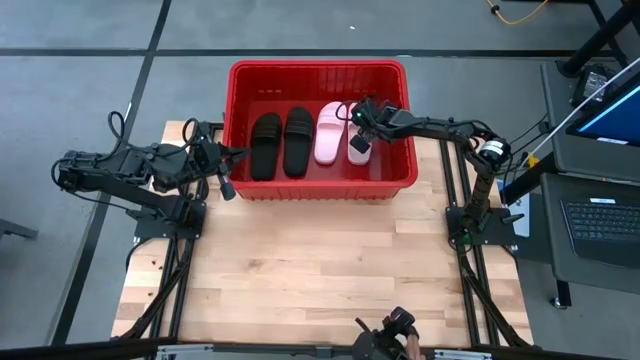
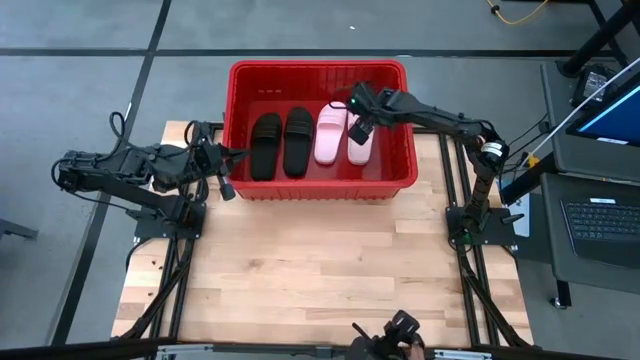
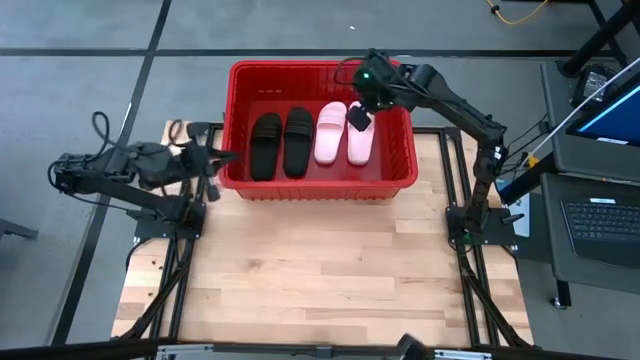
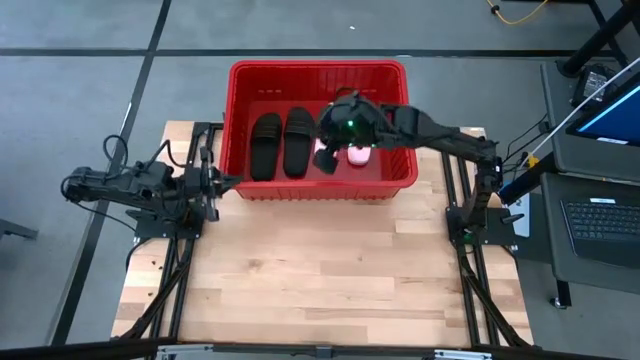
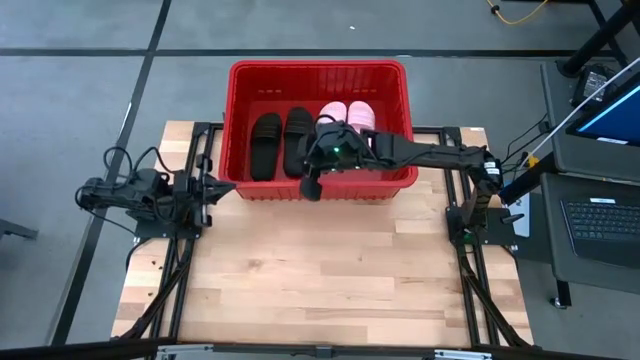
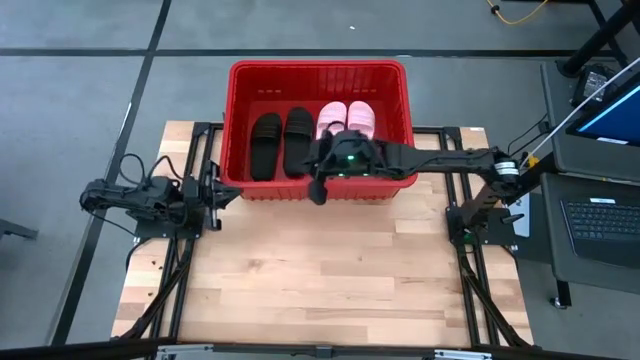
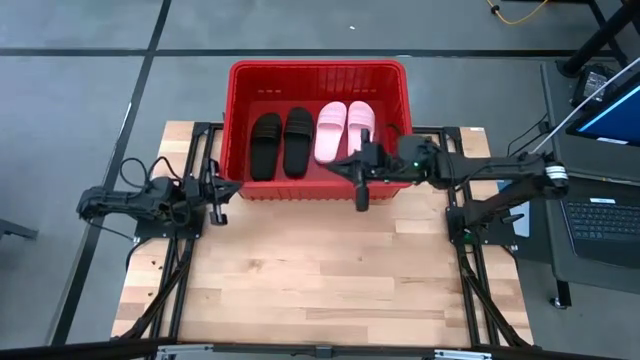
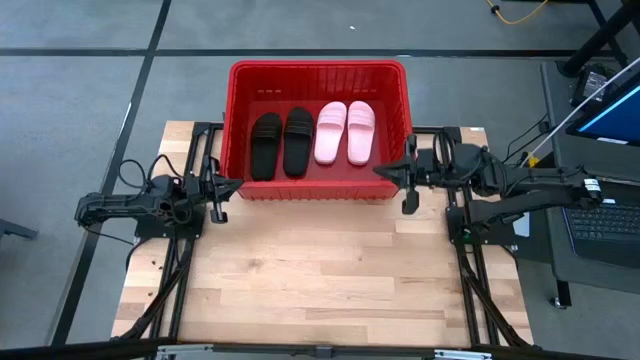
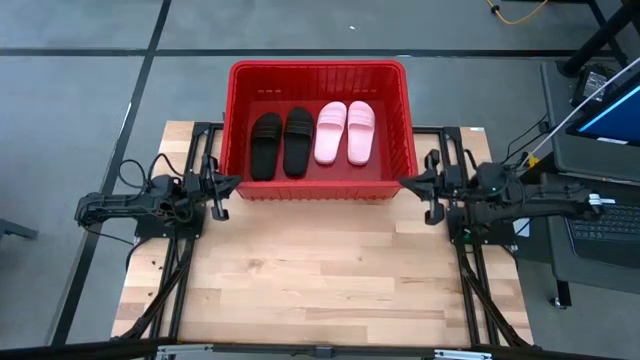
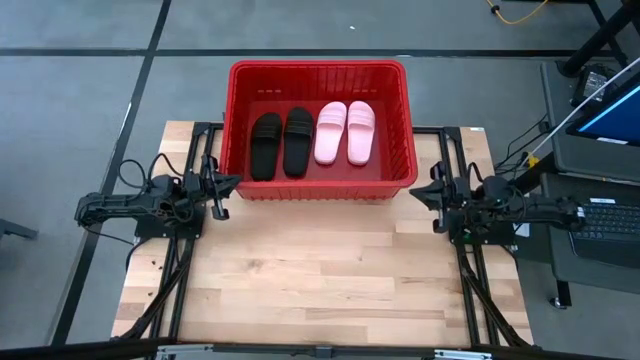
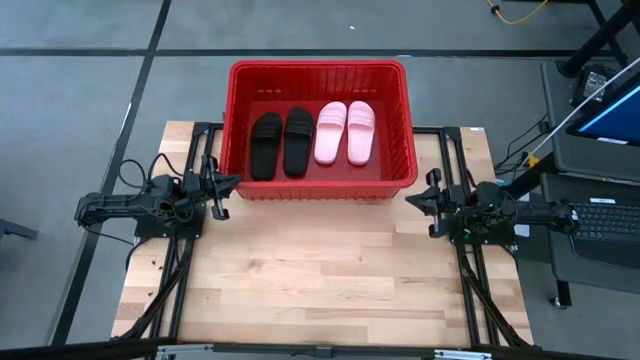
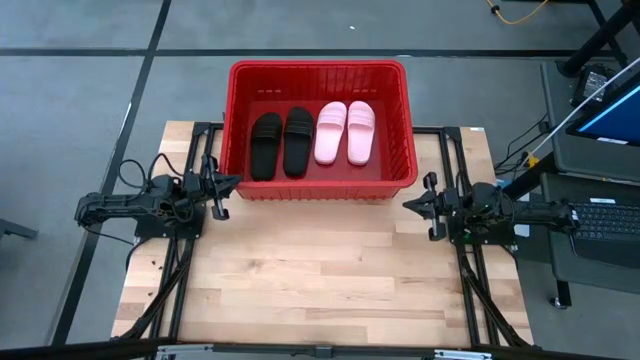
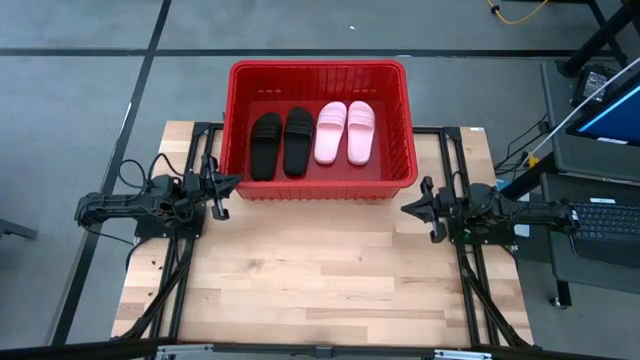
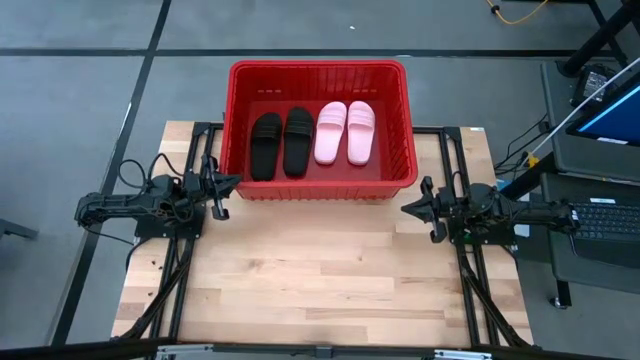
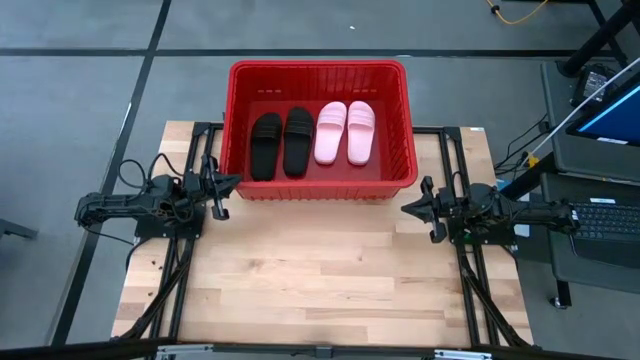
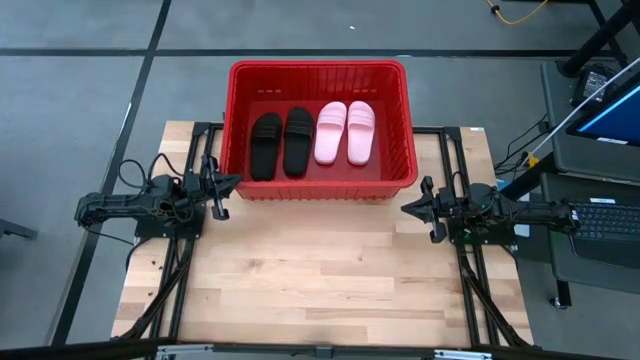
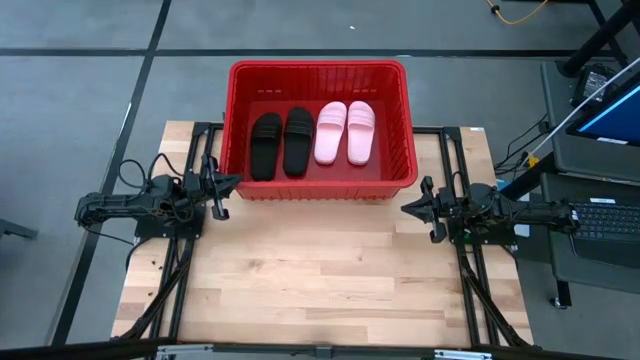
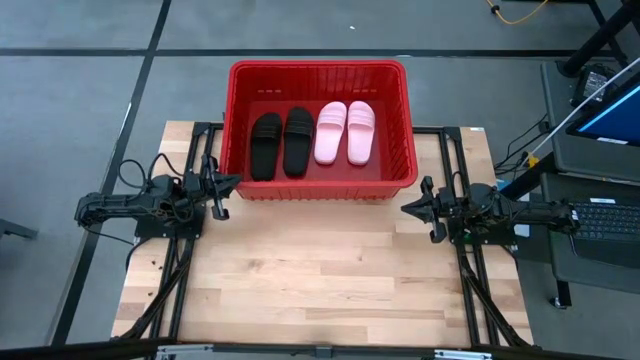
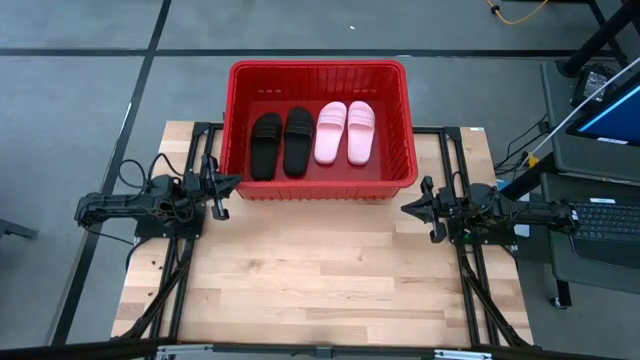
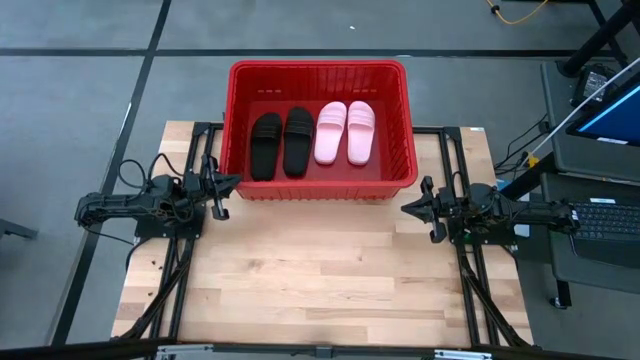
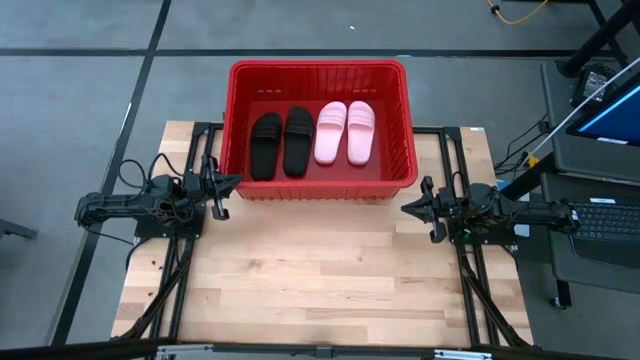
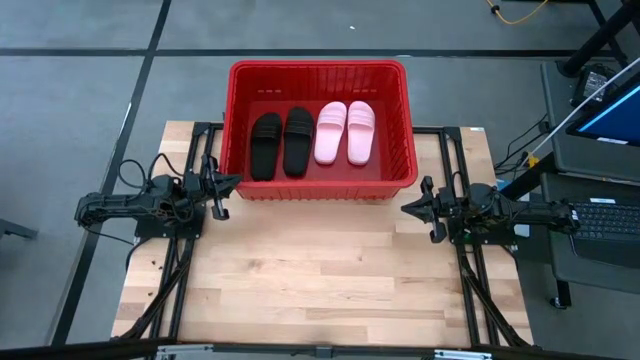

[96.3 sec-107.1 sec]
Task: Pick and place slides into bin
Return to Home Position

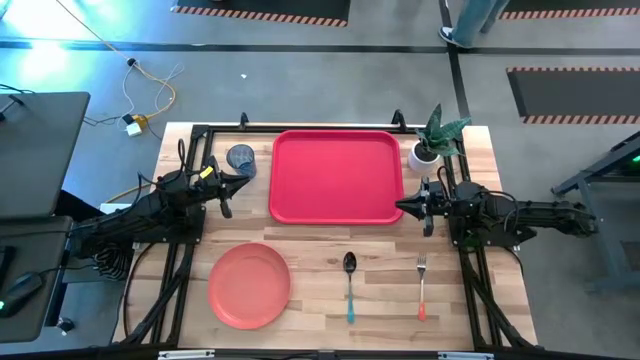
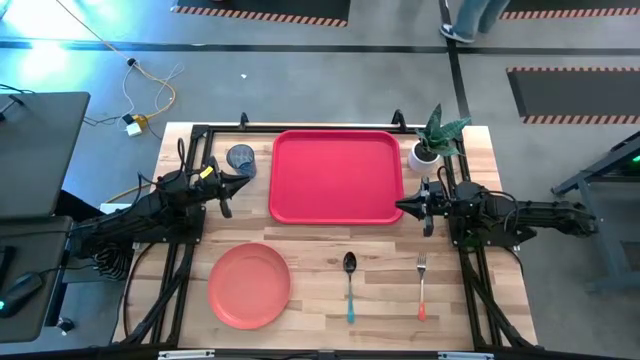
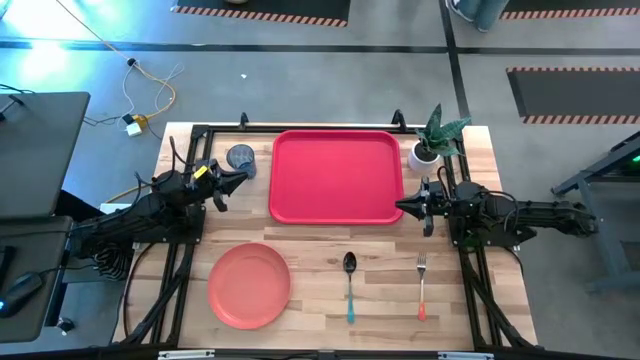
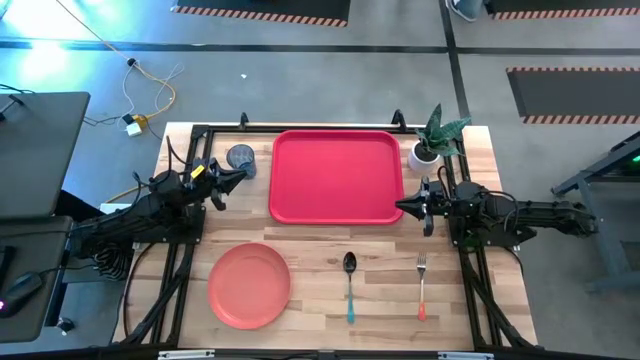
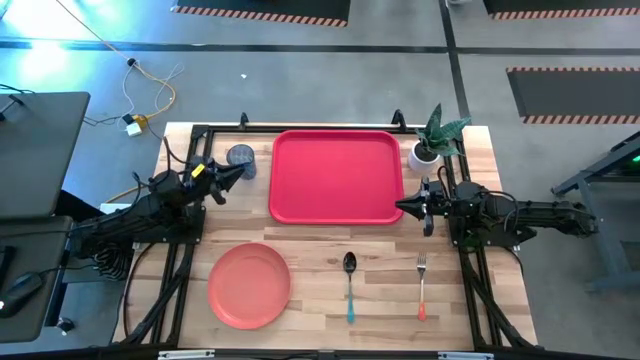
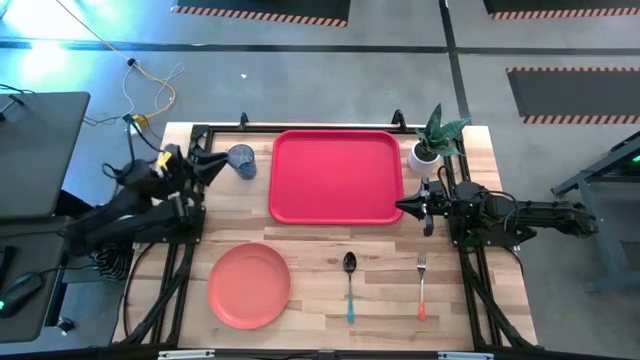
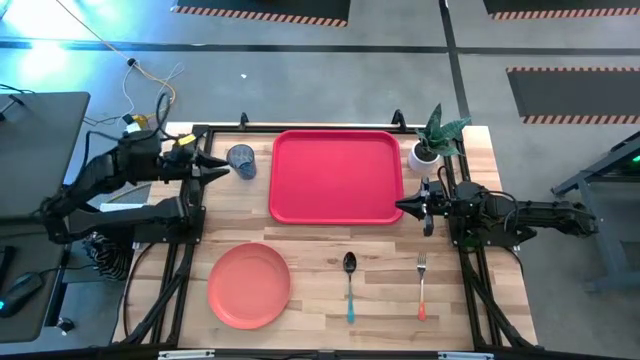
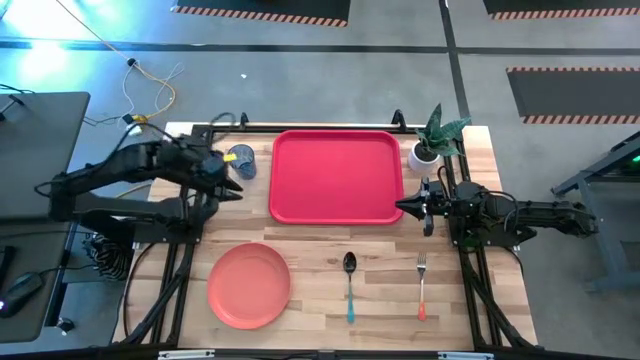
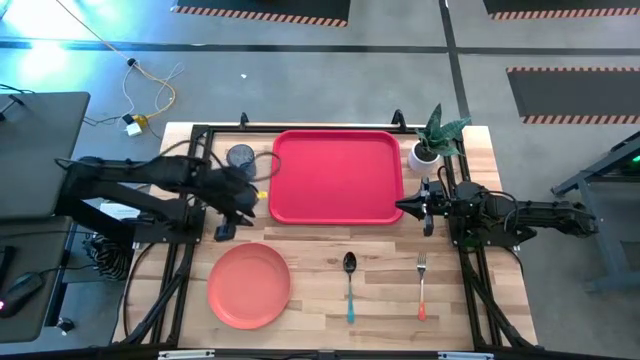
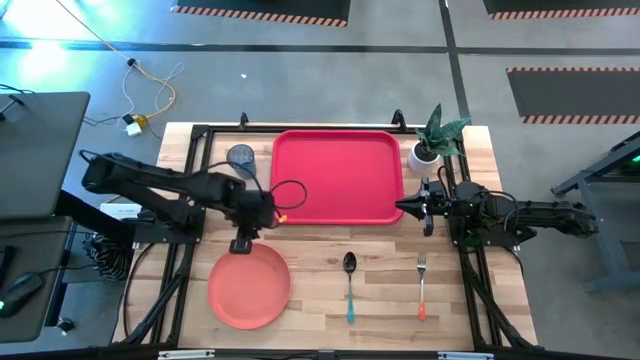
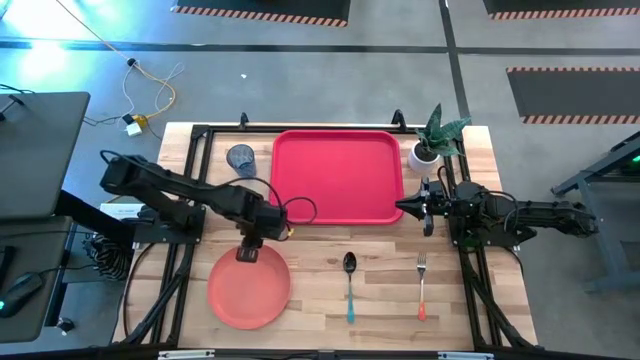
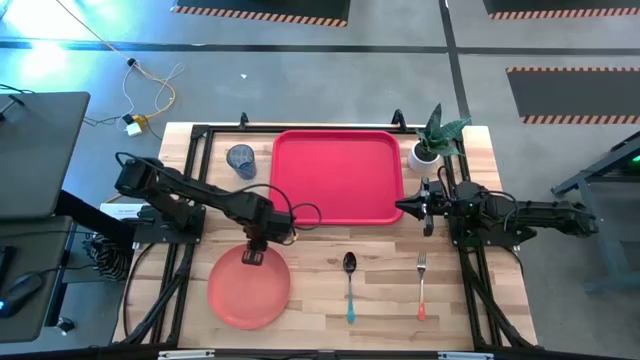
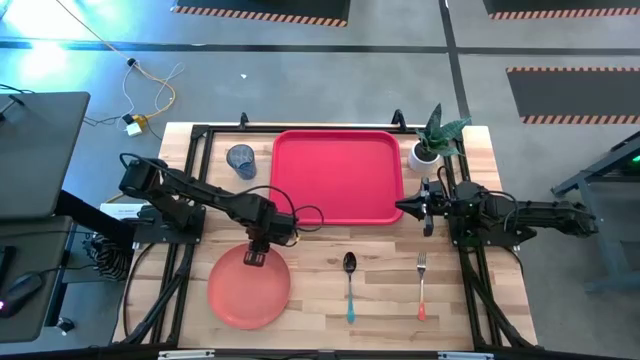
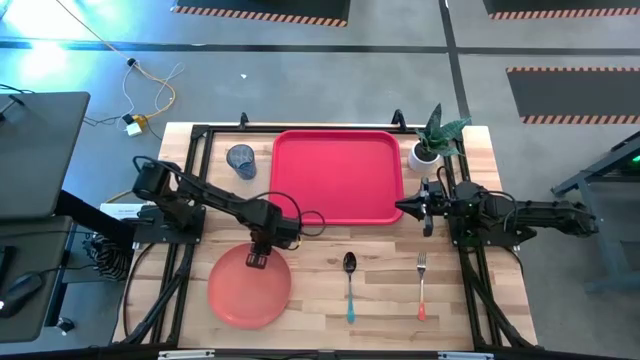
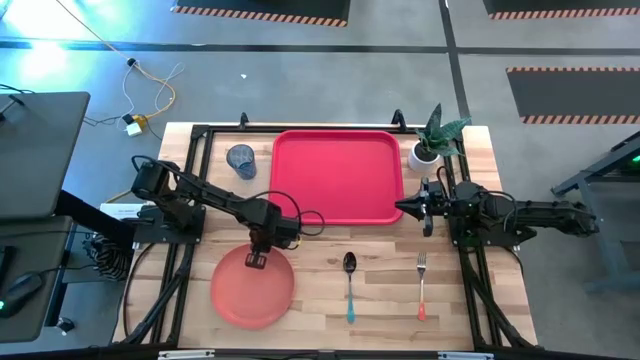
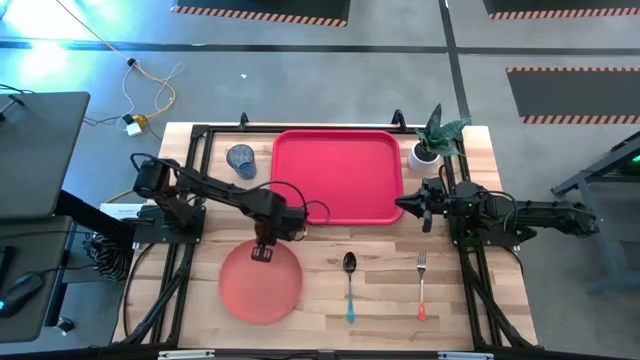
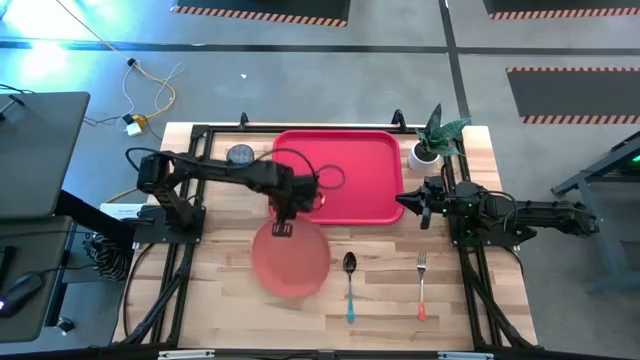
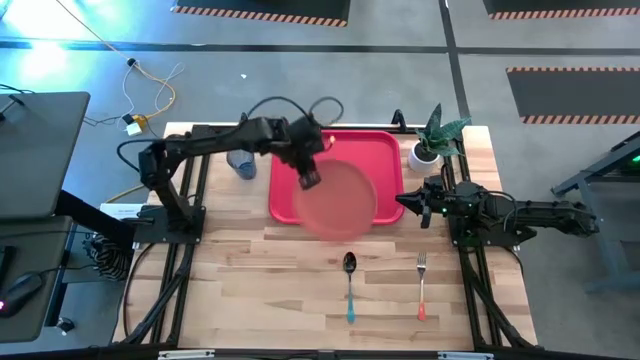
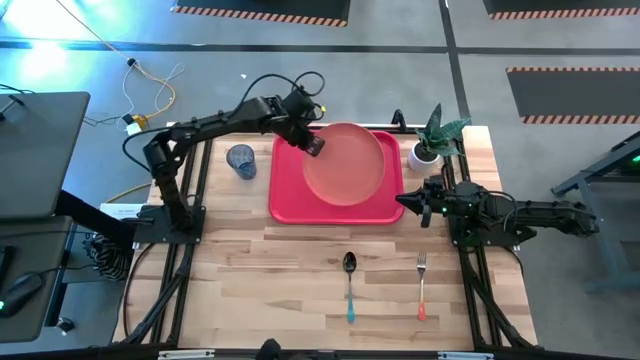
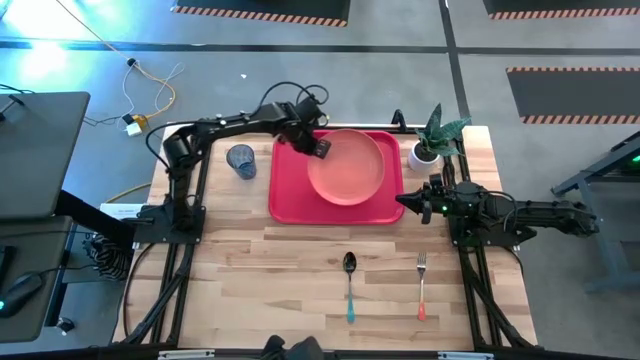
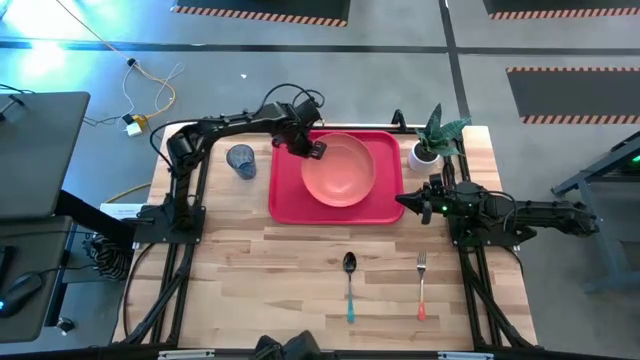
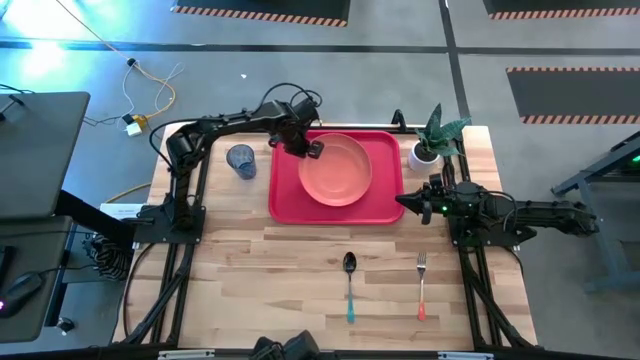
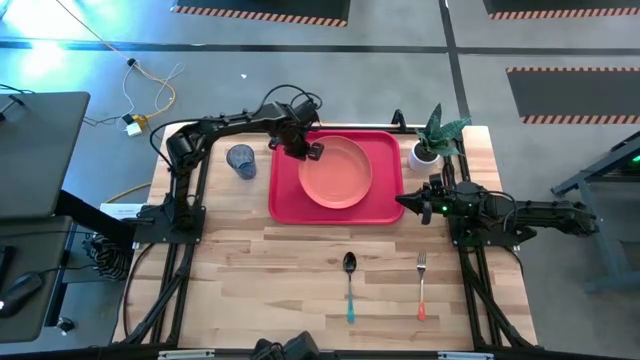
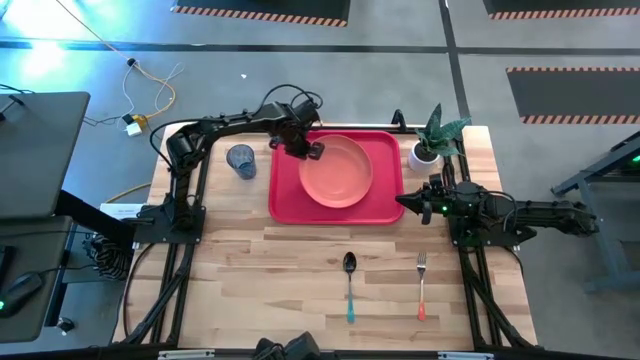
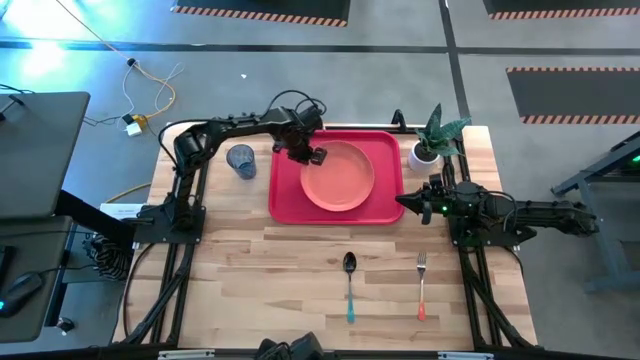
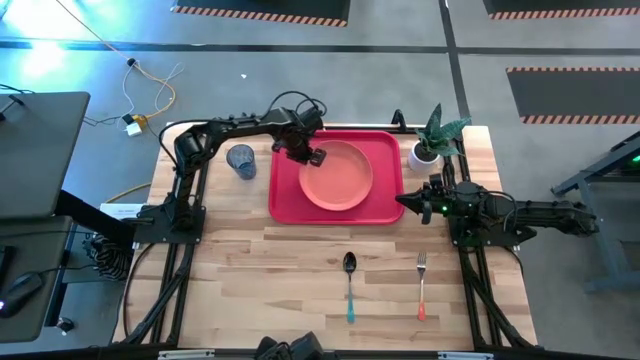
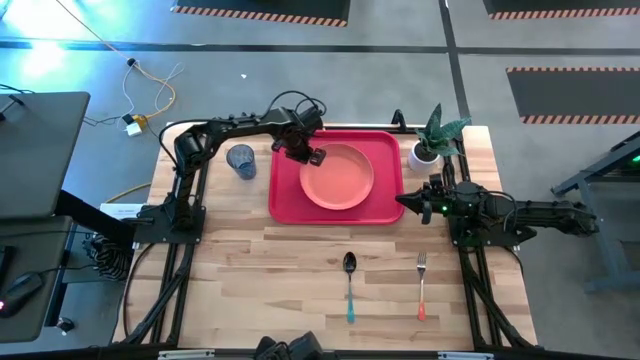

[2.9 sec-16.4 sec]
Task: Pick and place plate/cup/fork/spoon on tray
Put the orange plate on the red tray
